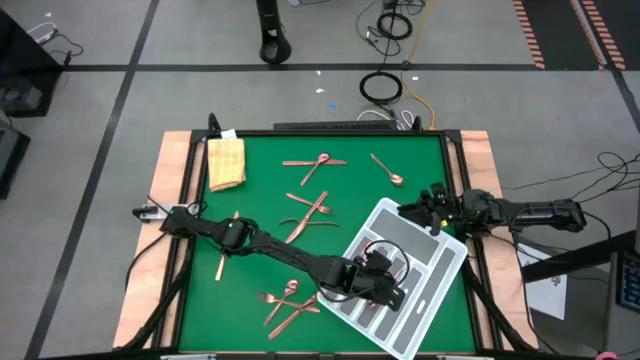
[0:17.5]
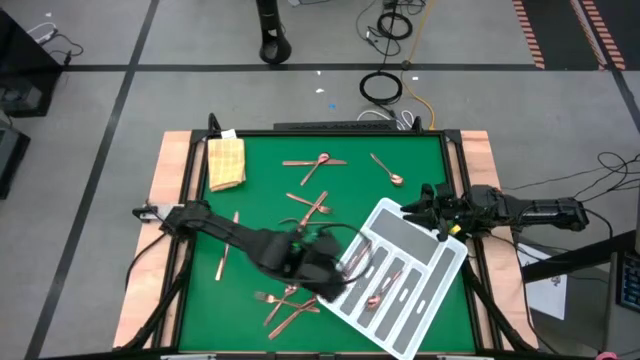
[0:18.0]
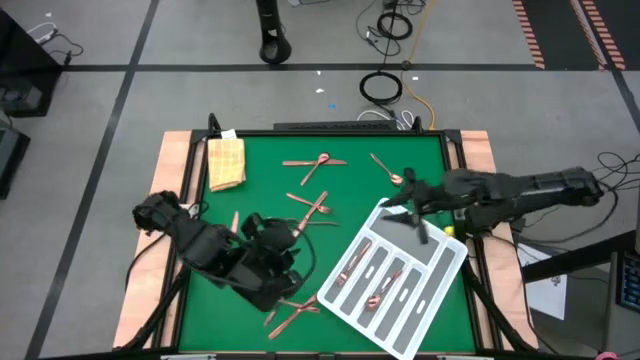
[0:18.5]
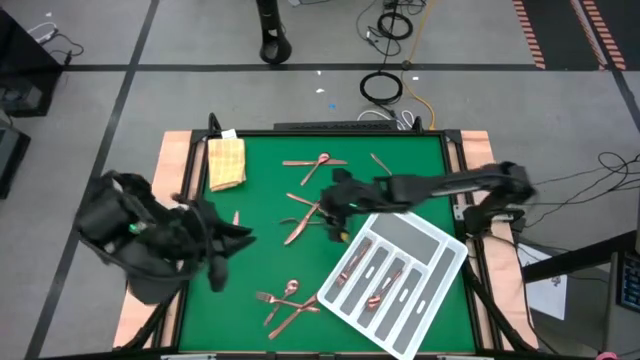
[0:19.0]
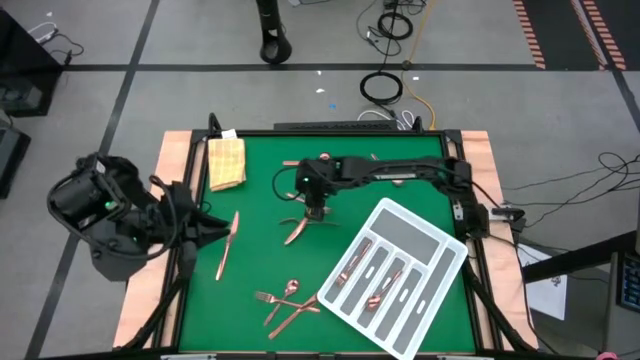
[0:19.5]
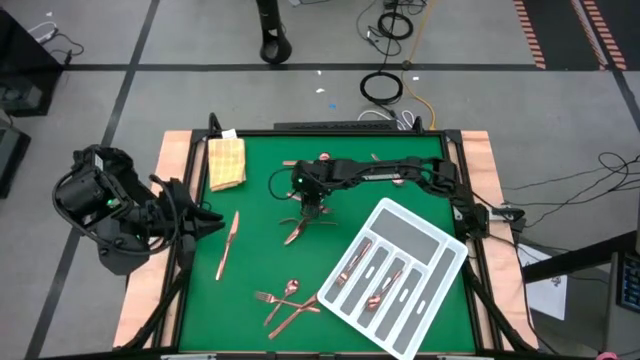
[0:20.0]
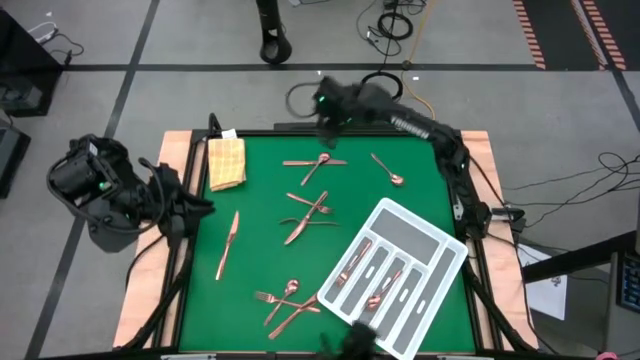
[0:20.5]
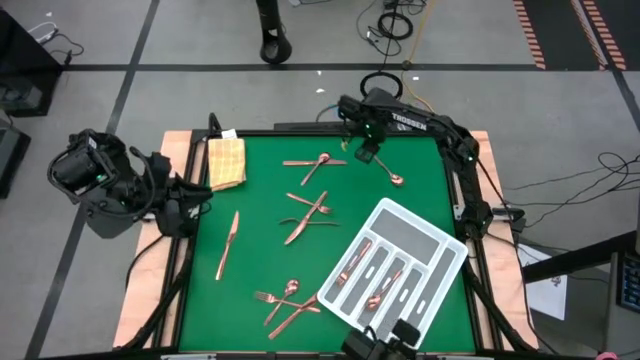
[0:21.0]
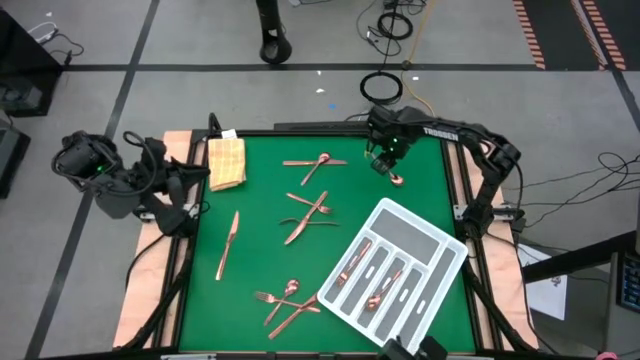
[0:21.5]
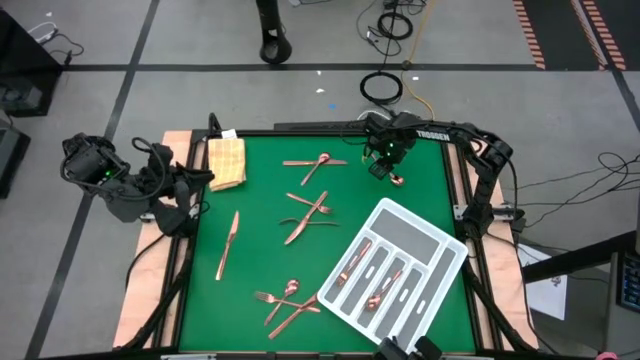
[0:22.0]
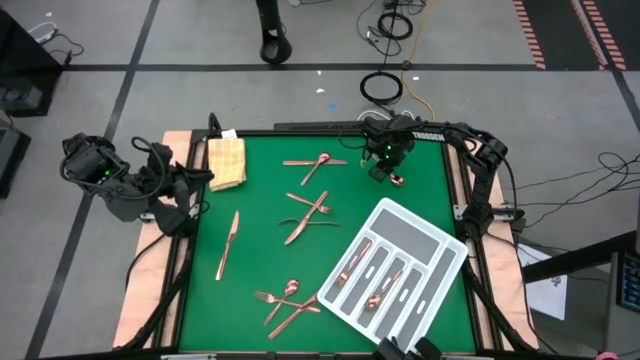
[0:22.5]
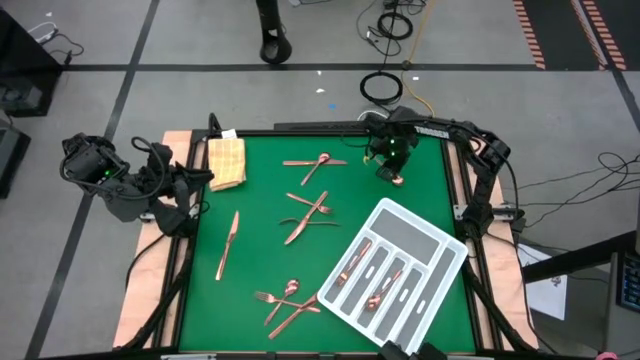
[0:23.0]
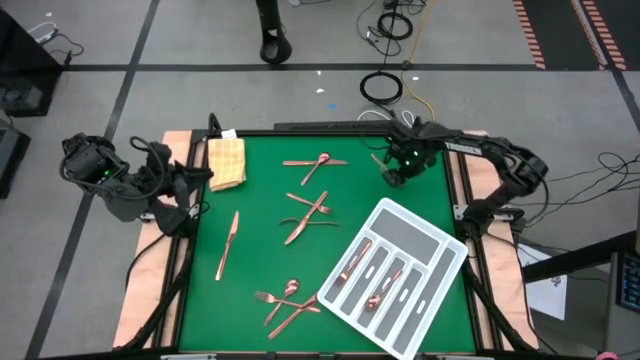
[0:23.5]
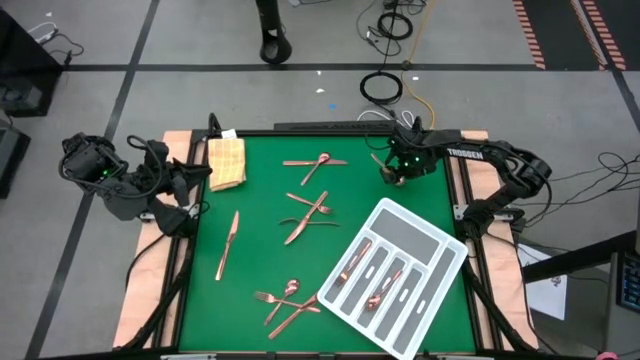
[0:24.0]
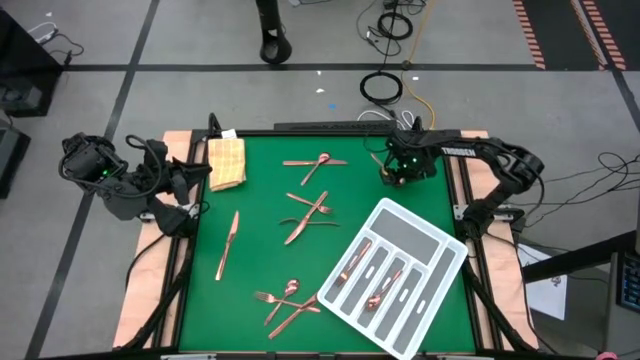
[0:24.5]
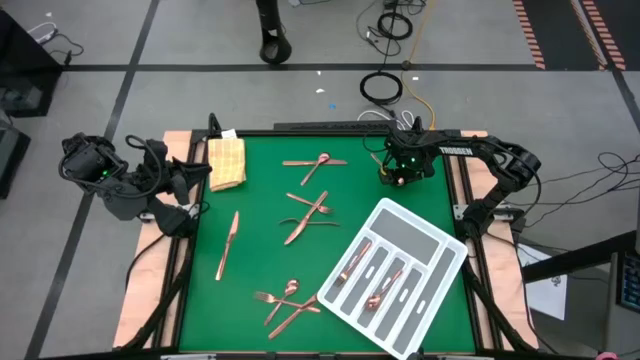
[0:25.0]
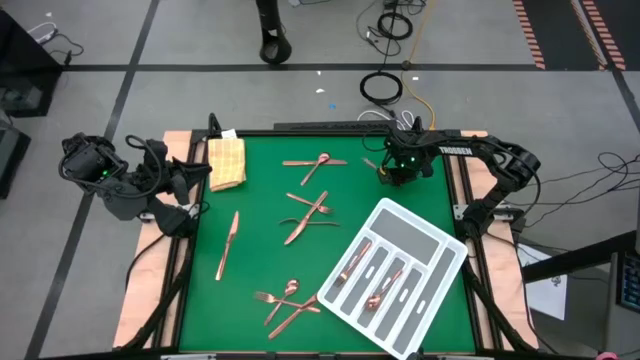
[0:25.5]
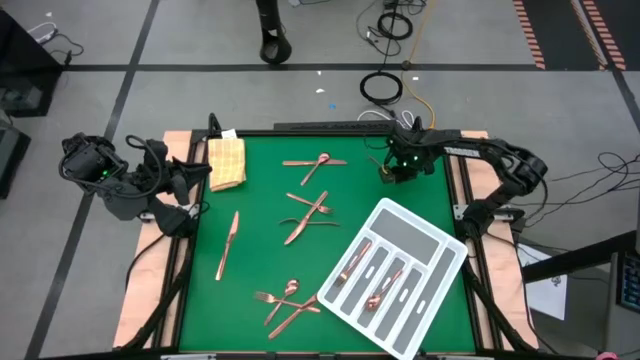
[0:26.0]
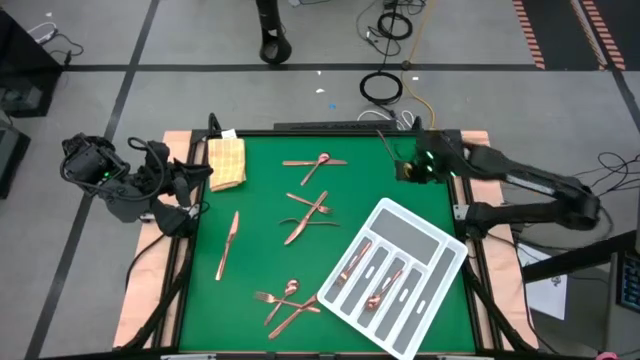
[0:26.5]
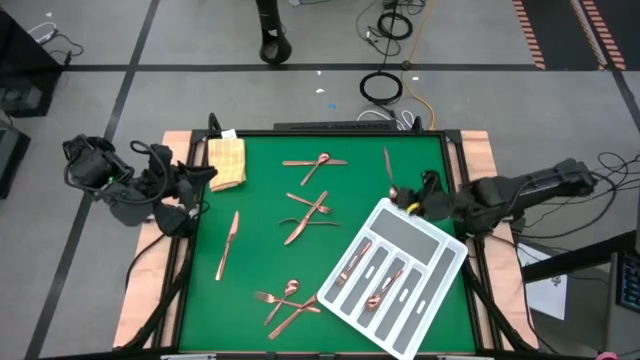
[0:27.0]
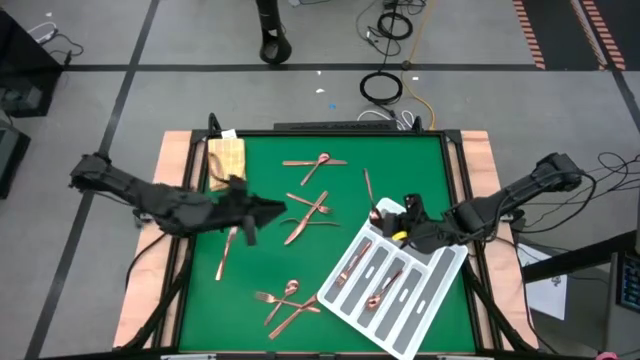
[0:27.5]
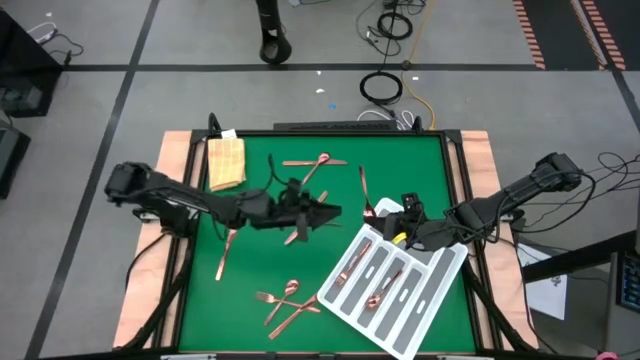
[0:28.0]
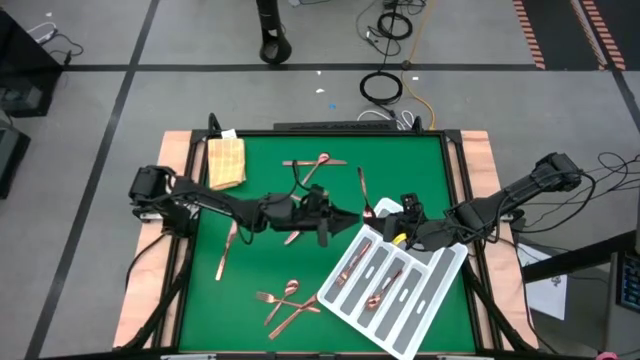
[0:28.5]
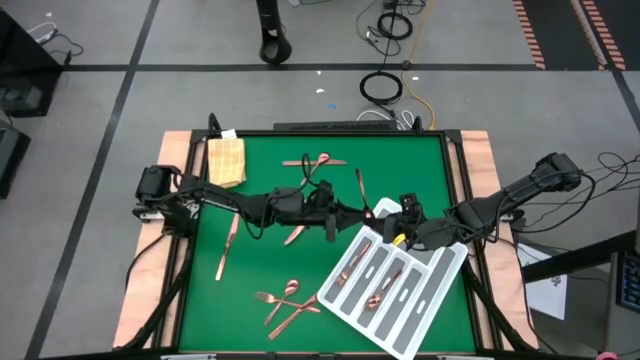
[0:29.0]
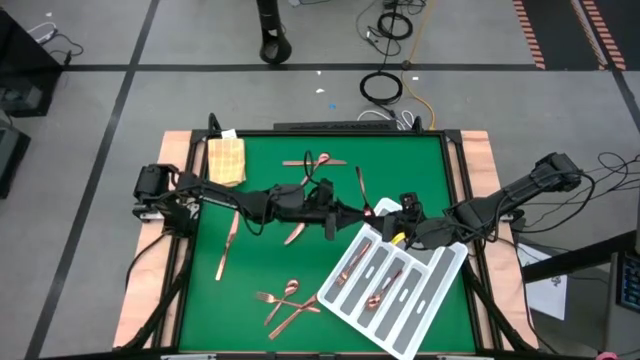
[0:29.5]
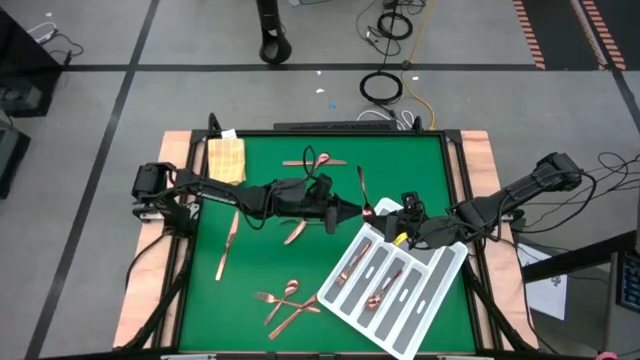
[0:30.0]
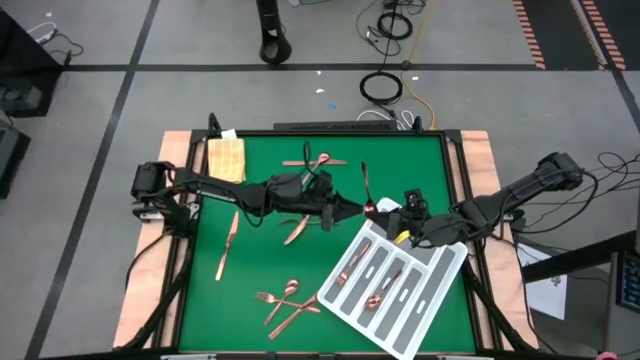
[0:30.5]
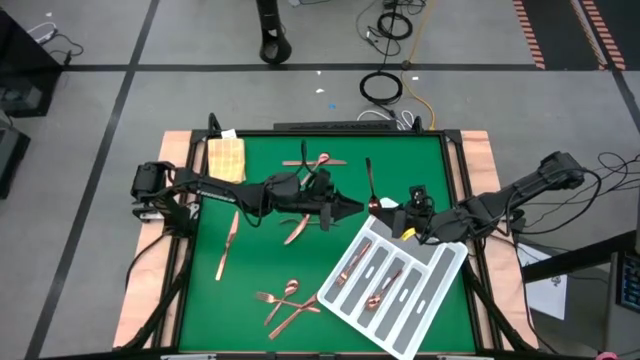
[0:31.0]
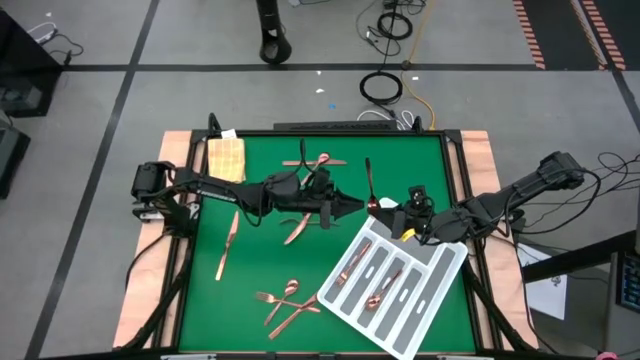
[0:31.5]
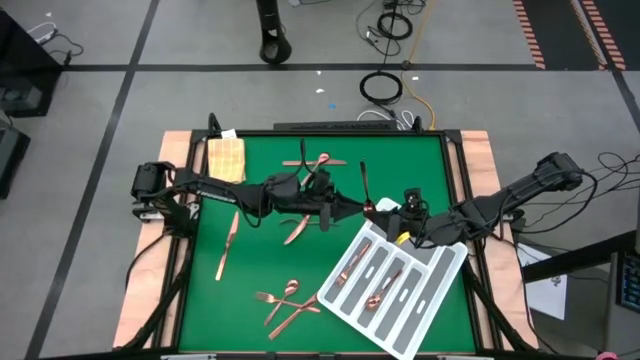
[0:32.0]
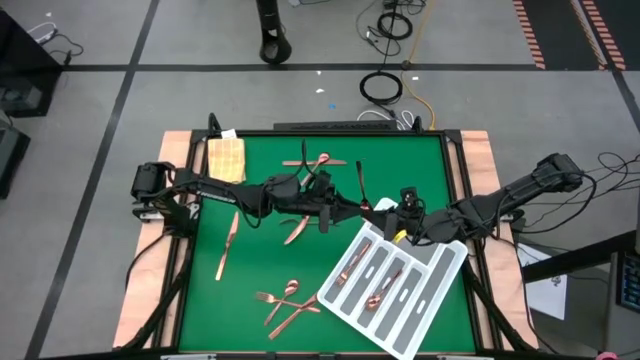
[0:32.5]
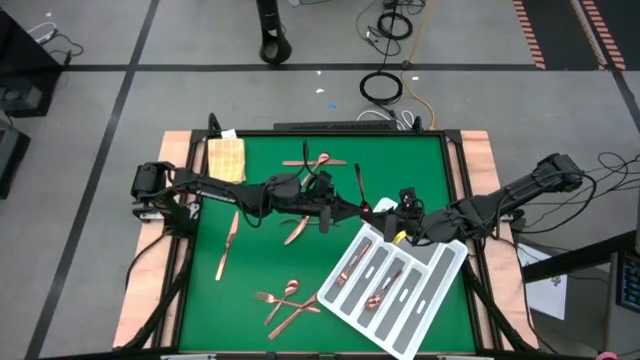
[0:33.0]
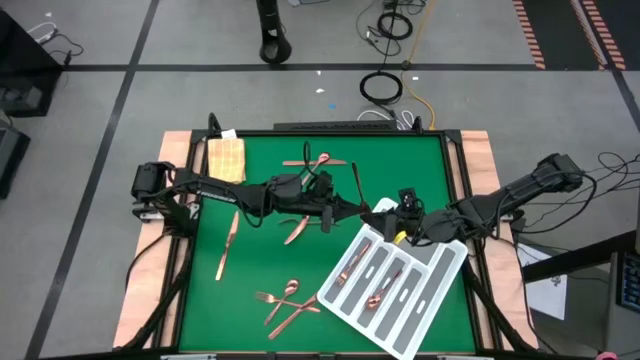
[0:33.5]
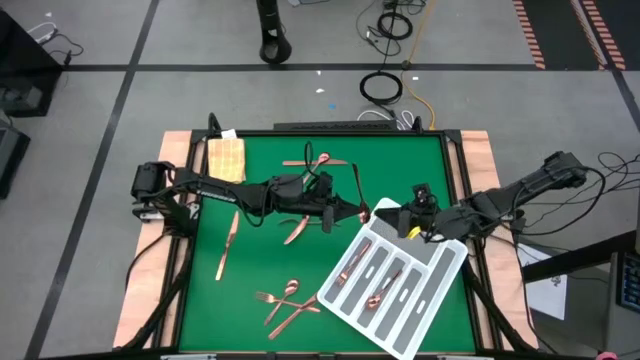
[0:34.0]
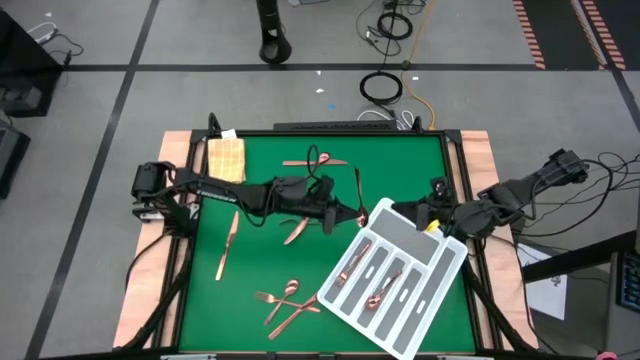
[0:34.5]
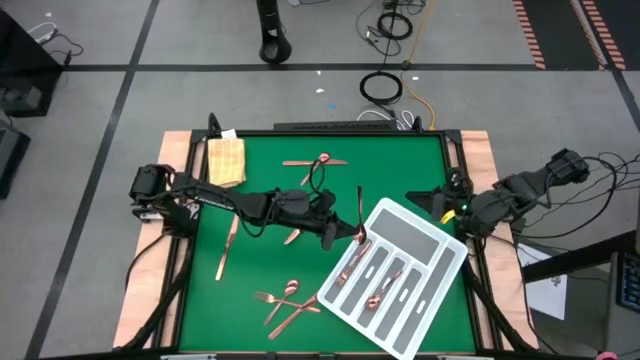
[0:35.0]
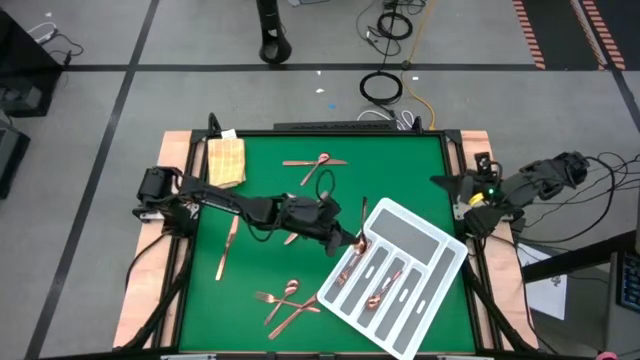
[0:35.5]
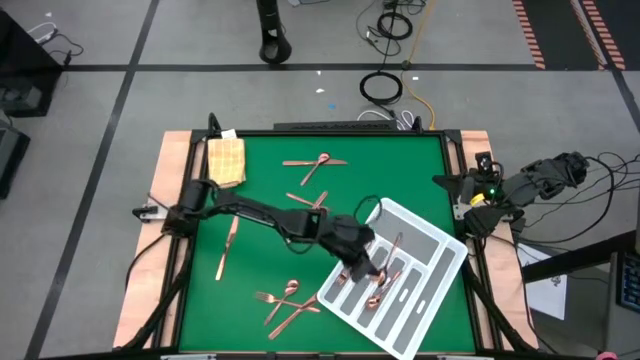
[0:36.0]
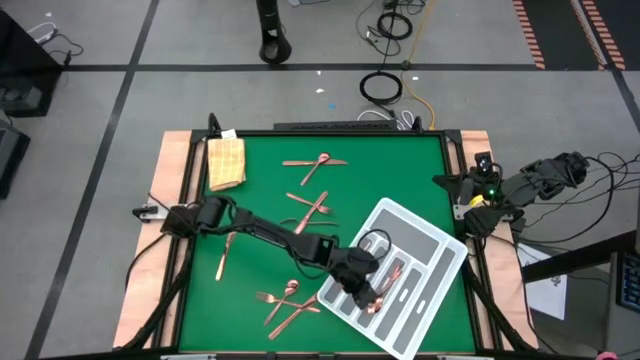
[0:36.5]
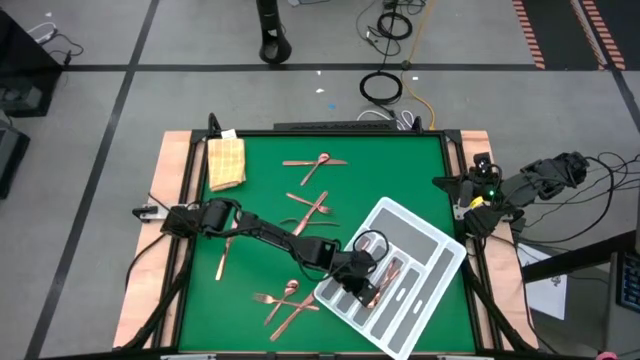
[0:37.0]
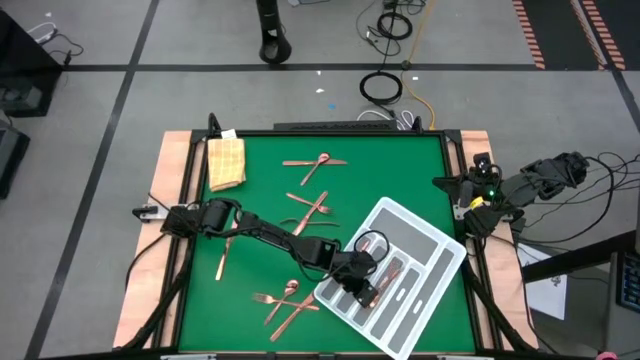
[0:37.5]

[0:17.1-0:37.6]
Task: Sort silverware
Put the bronze spoon into the silverware tray

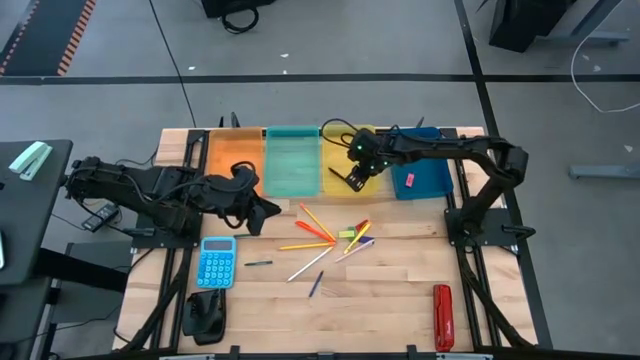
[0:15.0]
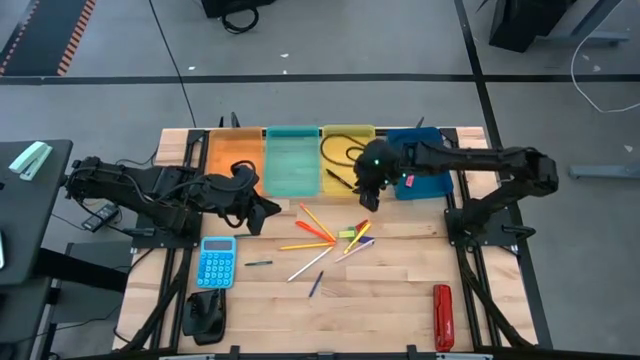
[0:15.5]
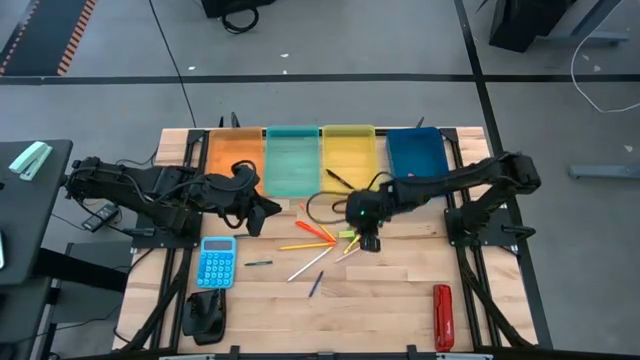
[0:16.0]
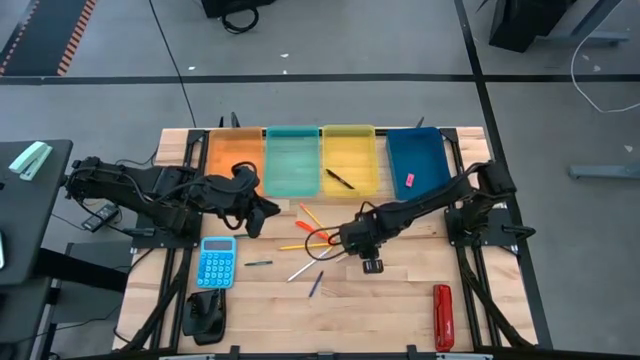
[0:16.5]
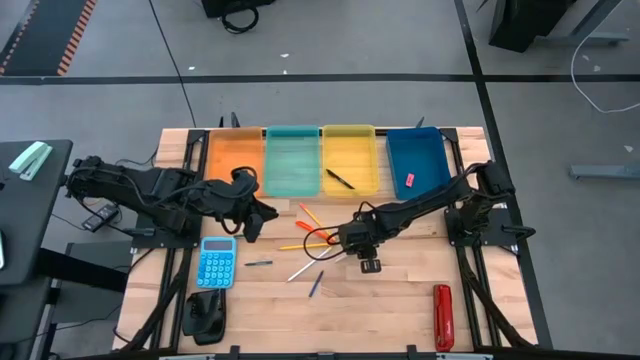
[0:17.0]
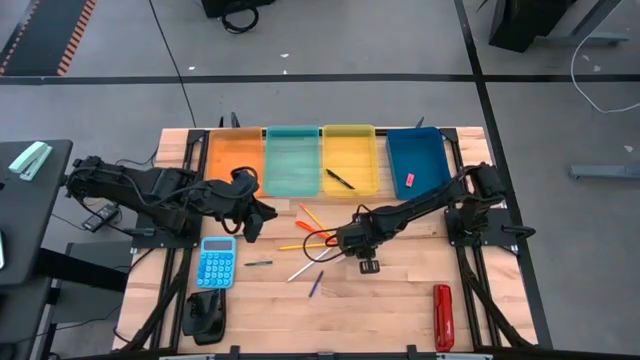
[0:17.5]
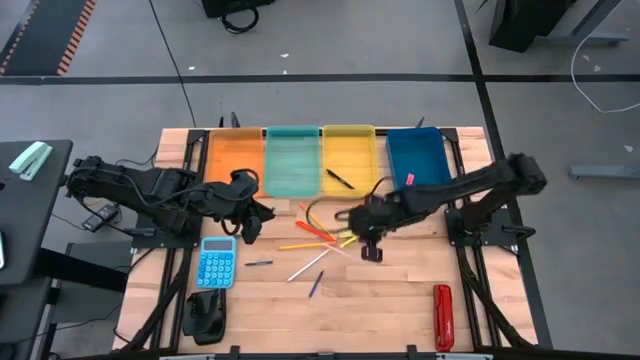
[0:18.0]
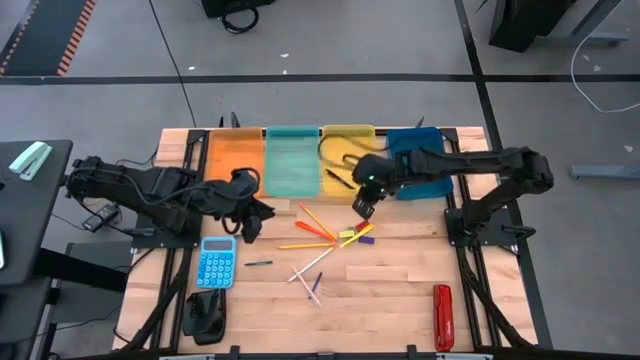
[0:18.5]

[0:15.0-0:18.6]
Task: Sort crayons/erasers/pens/pencils in bins
Put the light brown pen into the yellow bin
